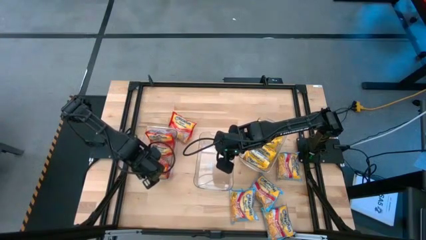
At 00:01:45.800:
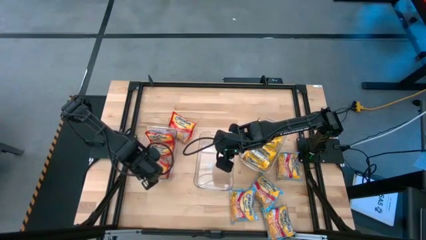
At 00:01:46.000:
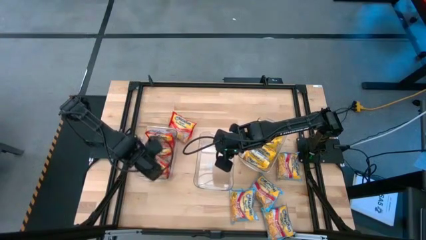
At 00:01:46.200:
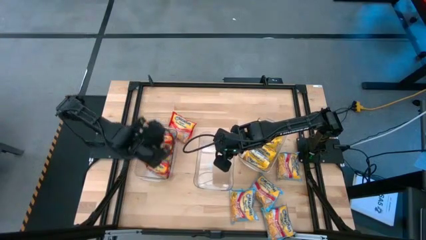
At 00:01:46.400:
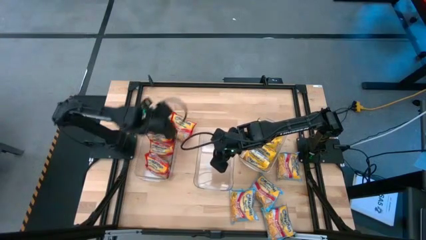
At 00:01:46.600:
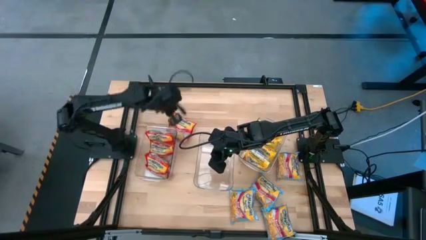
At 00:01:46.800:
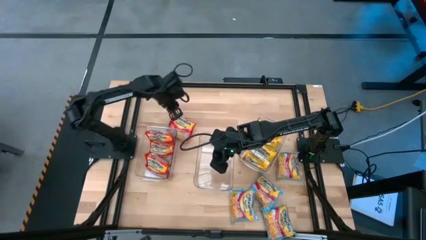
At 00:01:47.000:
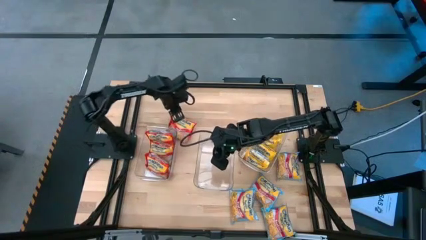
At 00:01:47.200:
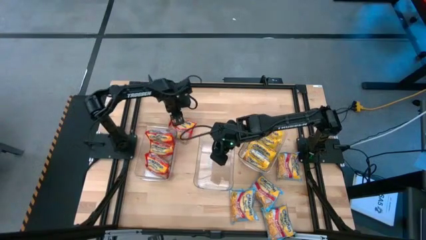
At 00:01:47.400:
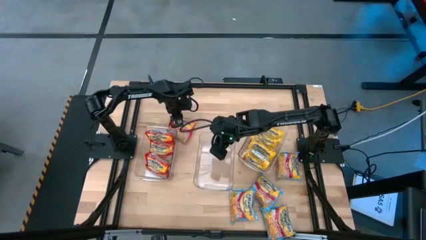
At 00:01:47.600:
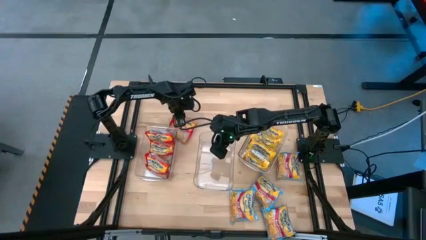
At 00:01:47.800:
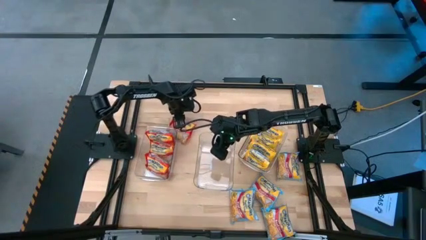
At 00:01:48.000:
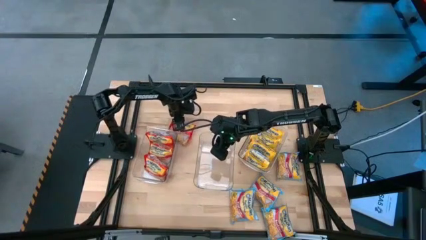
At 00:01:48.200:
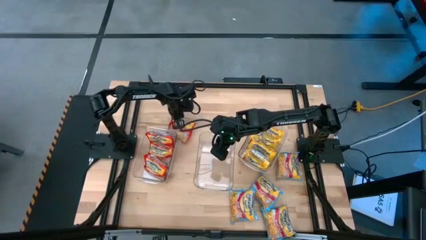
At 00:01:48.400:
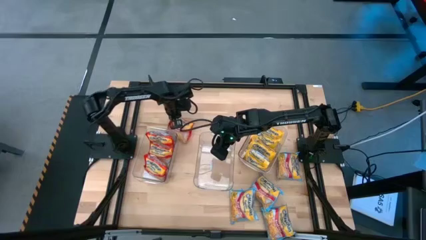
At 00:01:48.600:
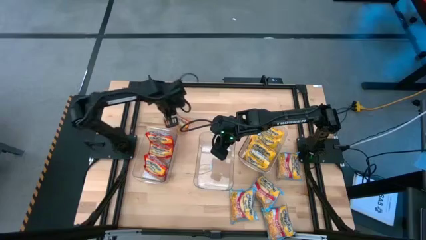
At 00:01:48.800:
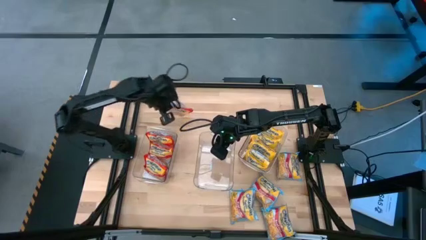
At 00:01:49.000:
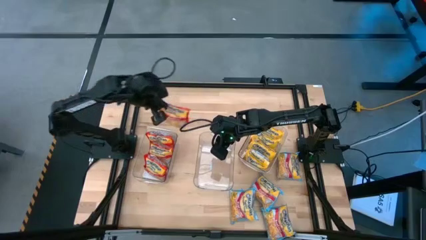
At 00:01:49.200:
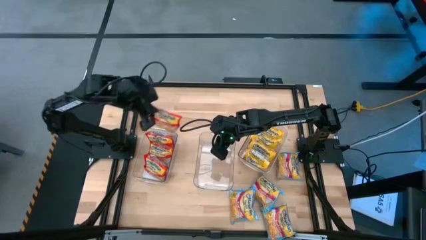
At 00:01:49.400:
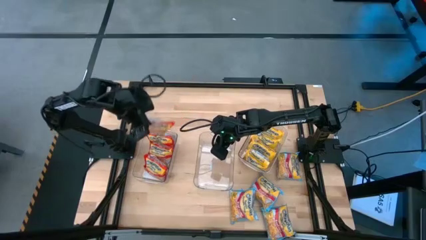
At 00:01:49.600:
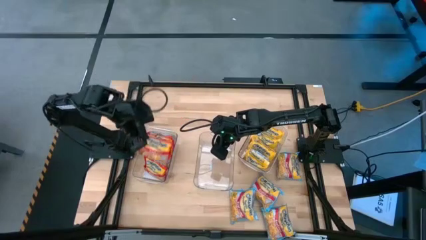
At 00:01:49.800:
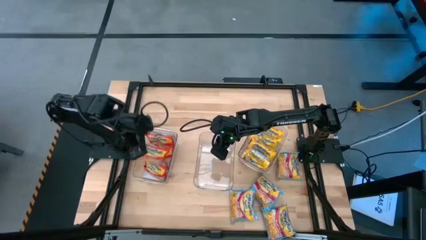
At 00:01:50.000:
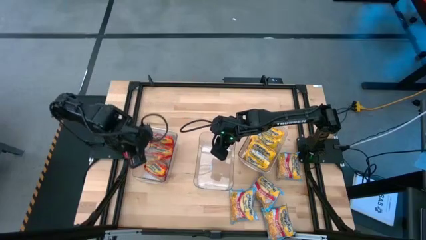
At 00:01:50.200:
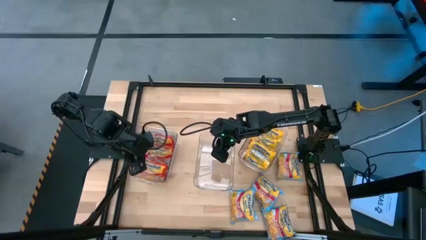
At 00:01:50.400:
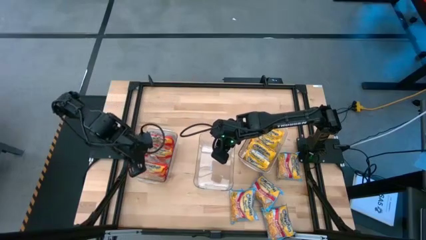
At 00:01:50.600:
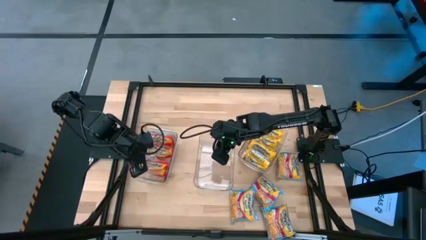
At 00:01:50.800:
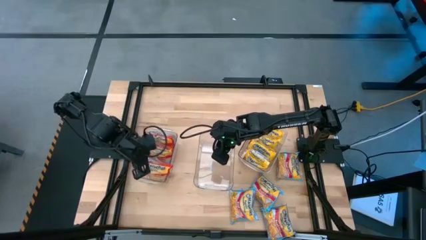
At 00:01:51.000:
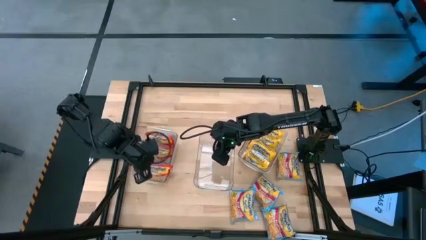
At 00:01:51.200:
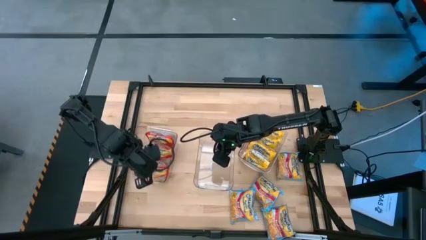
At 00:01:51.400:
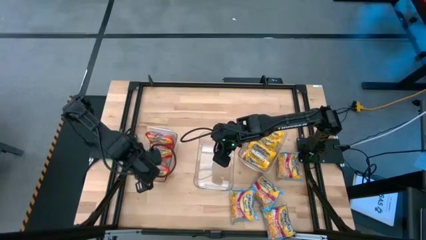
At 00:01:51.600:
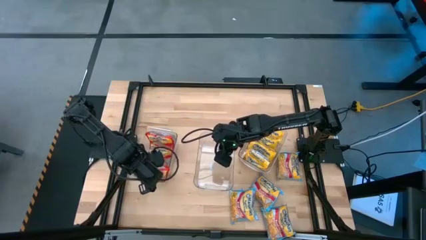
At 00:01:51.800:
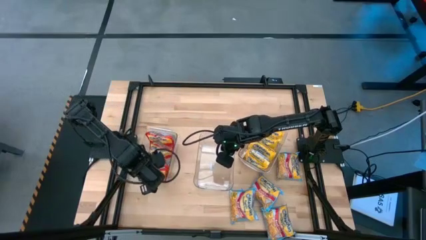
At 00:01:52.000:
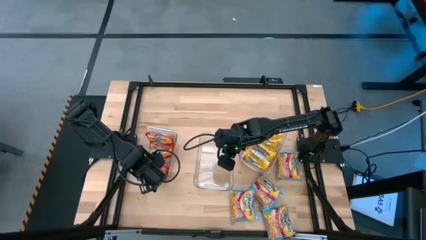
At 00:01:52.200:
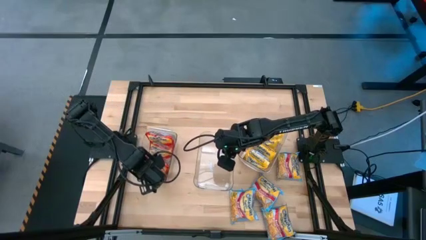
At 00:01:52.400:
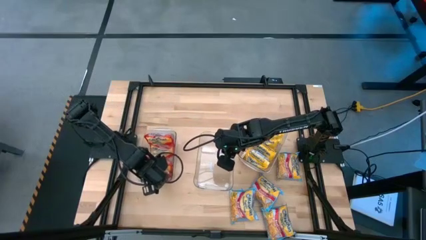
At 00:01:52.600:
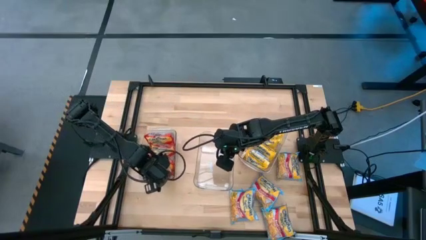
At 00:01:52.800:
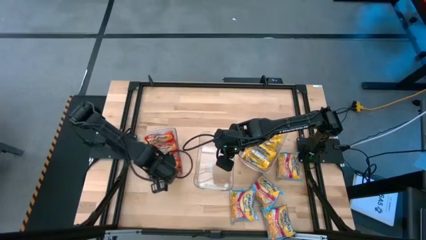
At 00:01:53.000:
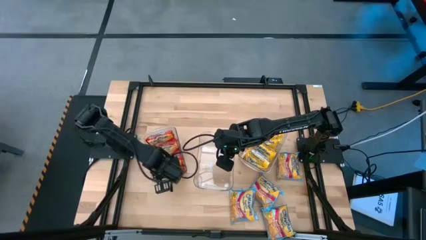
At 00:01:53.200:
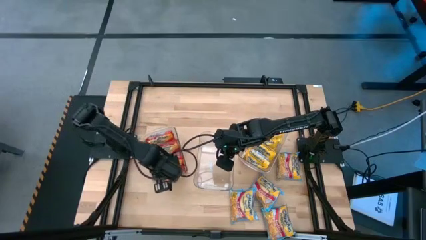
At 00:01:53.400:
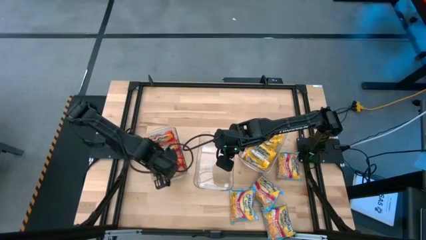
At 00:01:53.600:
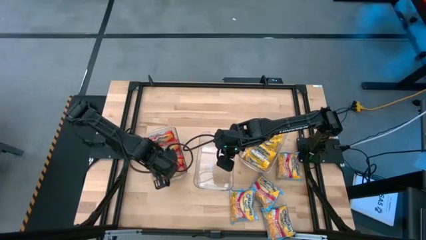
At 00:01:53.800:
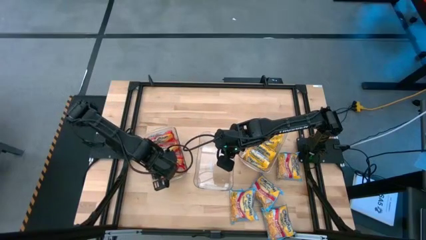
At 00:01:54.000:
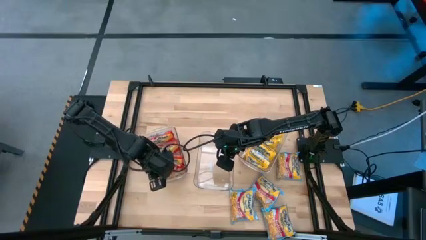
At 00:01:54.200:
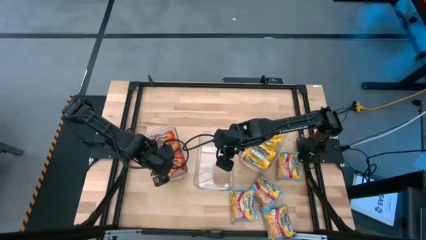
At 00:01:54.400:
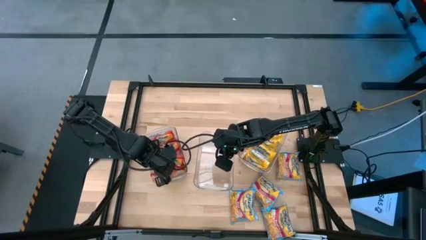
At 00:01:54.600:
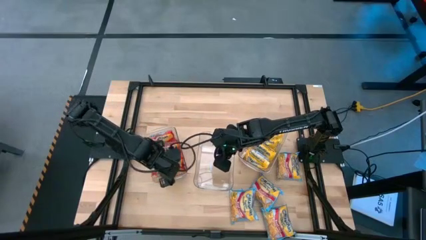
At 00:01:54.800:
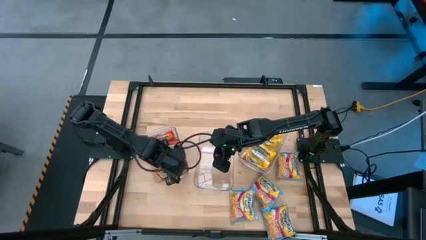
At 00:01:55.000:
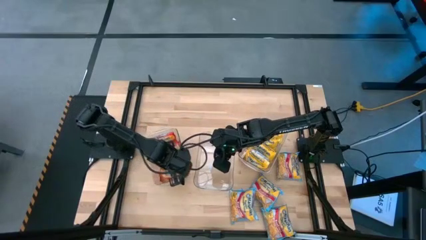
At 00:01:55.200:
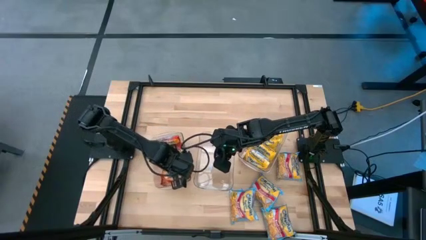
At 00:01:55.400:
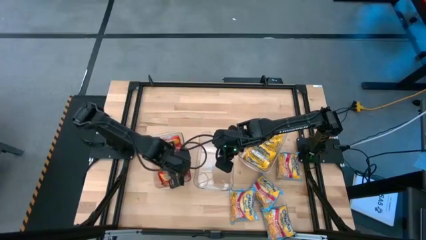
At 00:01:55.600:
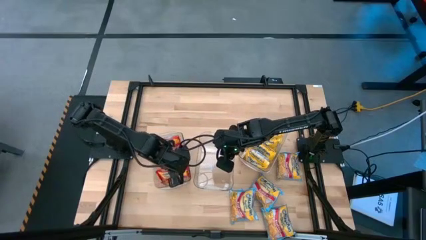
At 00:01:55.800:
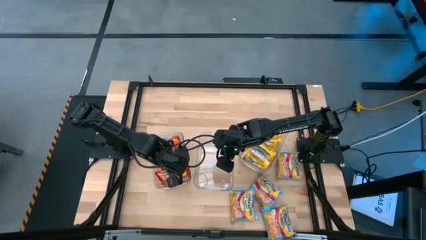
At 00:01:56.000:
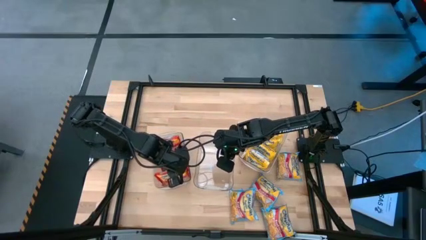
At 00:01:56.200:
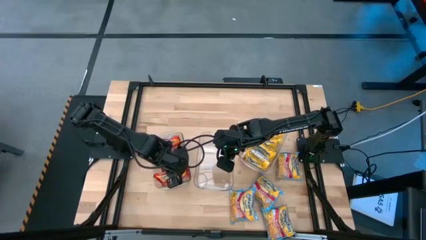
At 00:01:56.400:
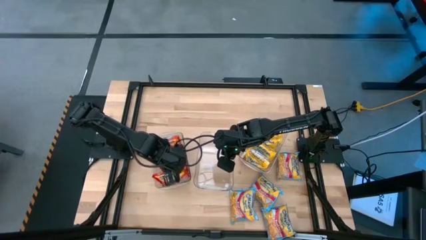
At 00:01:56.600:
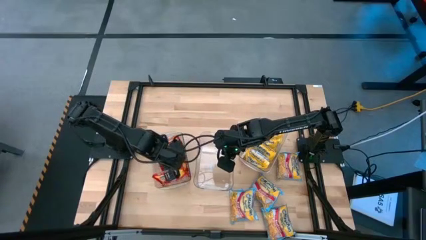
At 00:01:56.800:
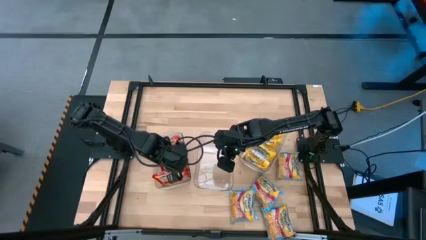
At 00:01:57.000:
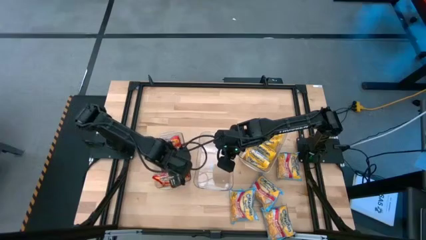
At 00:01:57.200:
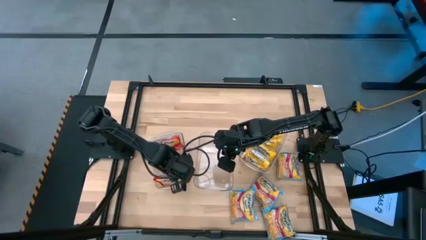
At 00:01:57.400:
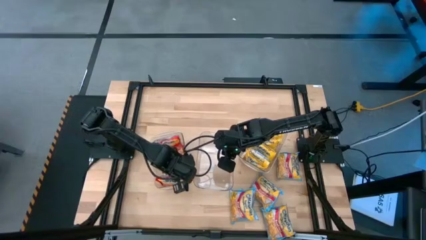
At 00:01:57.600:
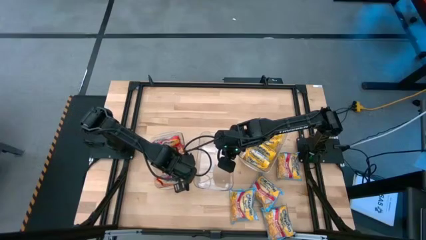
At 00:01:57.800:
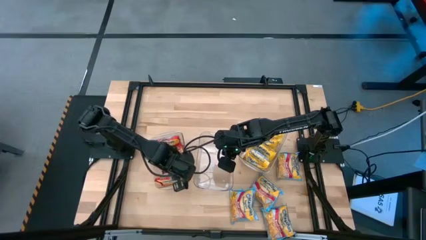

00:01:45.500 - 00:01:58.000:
Task: Sort Maruchan noodles
Put the red noodle pack into the left transparent bin

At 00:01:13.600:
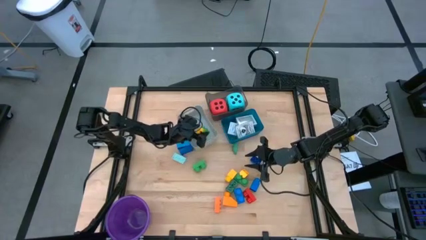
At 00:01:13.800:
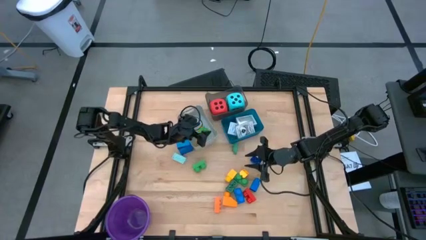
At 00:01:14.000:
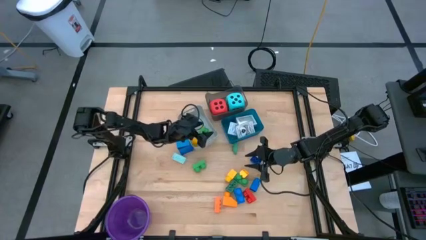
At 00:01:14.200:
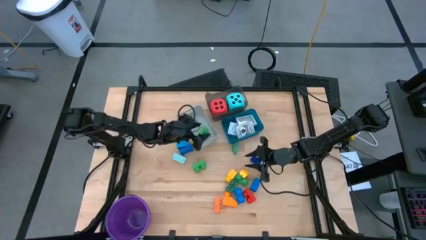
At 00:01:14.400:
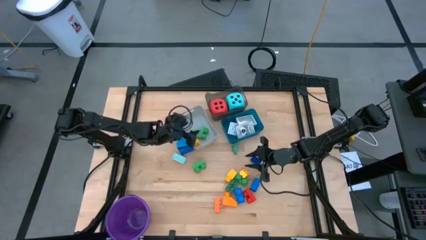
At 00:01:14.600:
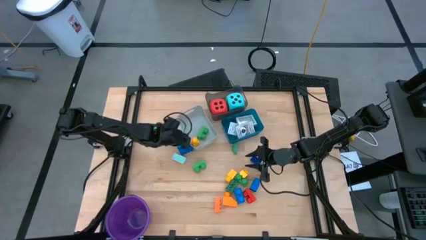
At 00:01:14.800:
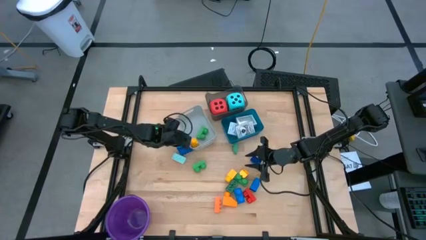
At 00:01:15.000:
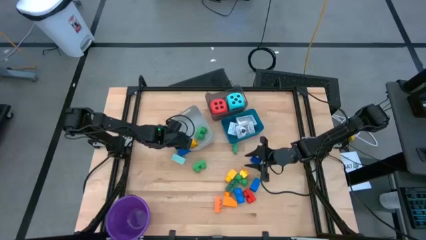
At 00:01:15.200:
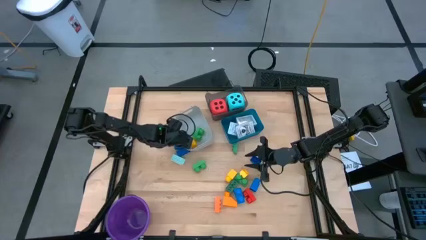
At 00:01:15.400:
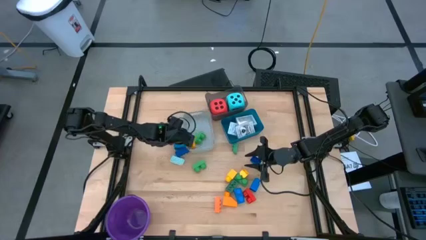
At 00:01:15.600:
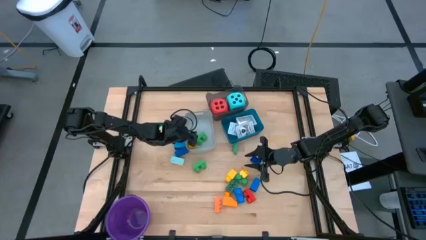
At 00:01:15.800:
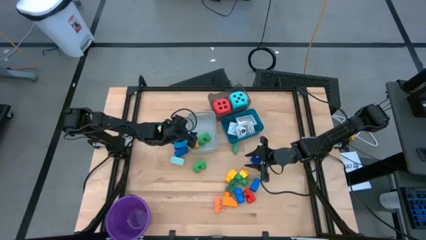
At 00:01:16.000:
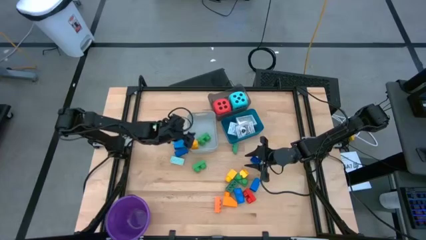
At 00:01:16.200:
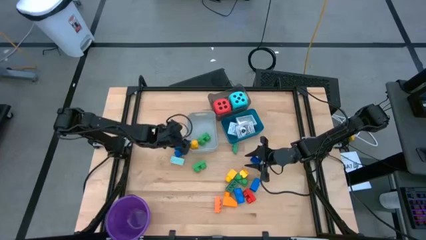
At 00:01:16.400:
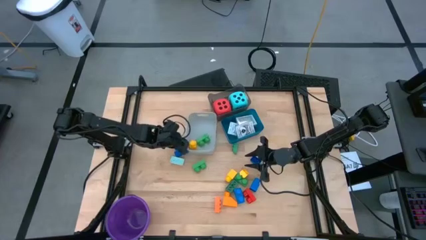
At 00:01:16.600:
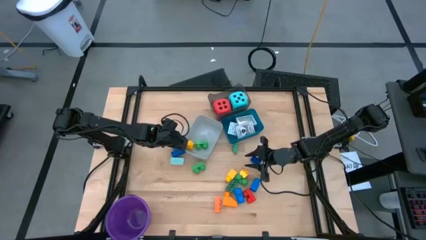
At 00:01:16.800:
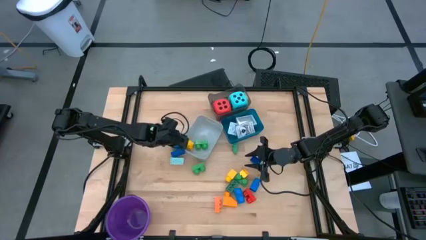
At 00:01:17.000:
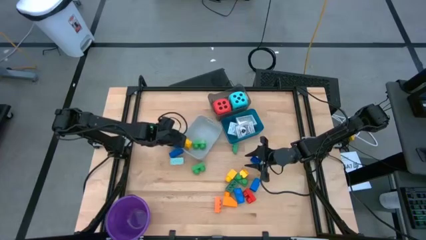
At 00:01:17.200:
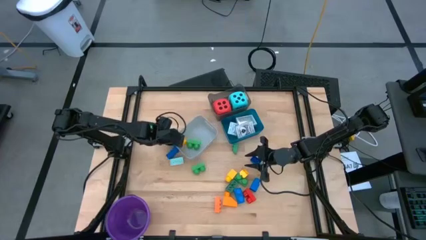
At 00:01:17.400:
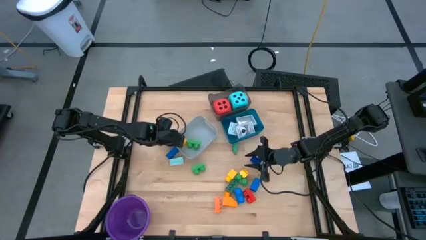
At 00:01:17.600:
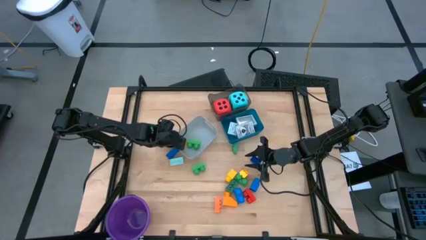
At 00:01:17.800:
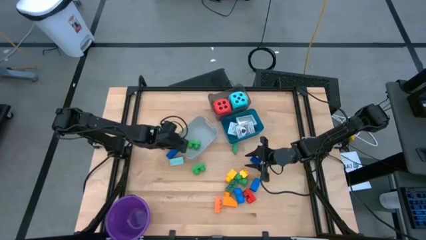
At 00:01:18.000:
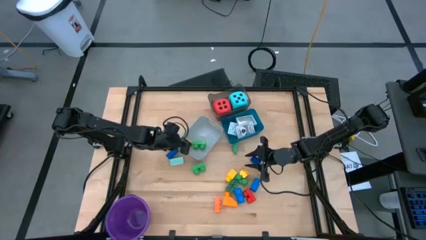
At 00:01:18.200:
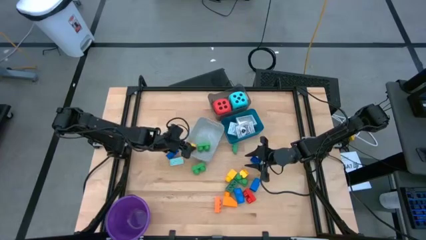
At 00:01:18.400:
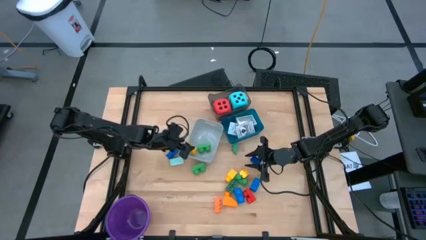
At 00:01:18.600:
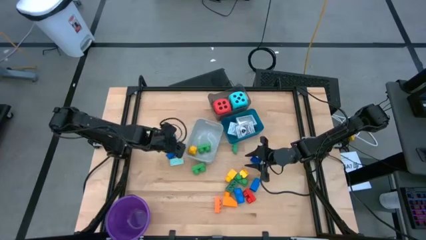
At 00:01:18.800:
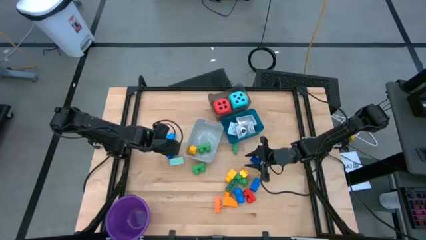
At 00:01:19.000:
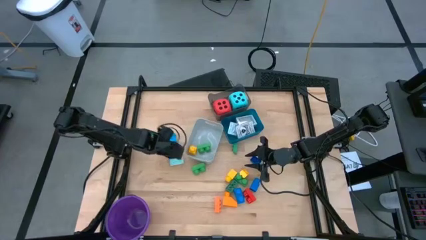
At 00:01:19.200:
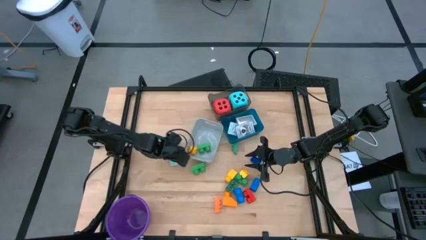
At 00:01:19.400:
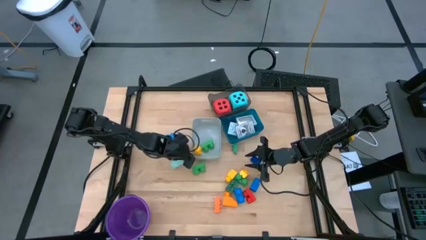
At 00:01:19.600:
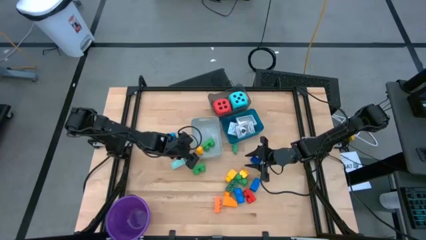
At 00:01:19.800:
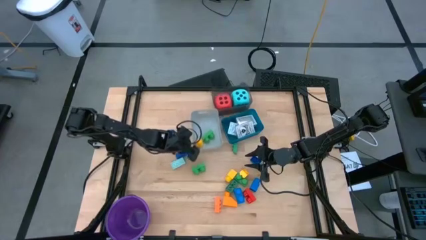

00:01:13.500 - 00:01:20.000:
Task: Pick & Place Toys
Adjust the gray bin on the table
